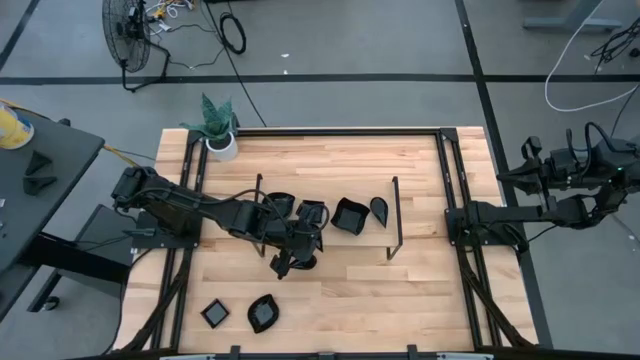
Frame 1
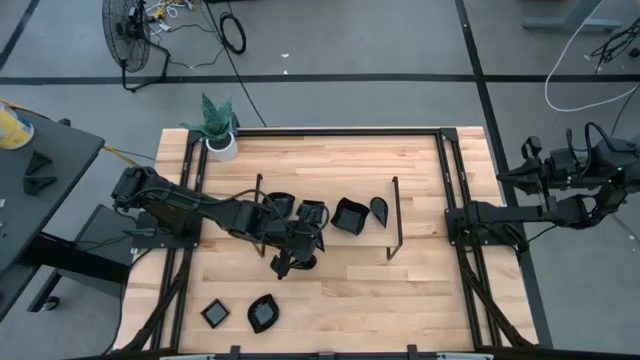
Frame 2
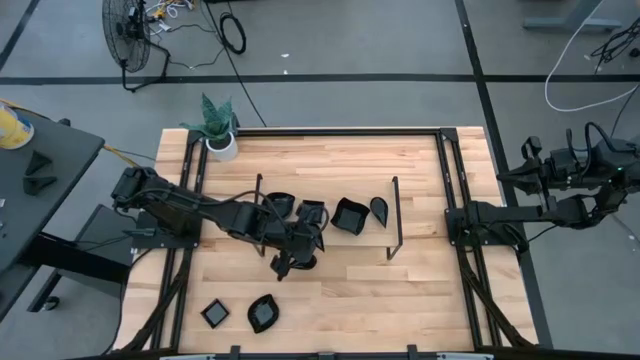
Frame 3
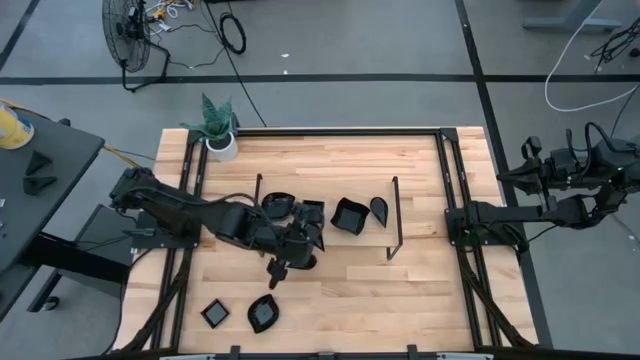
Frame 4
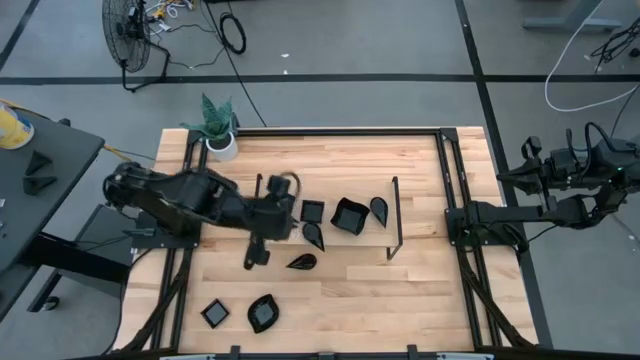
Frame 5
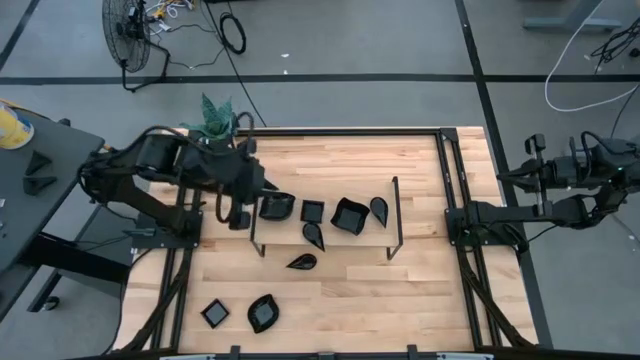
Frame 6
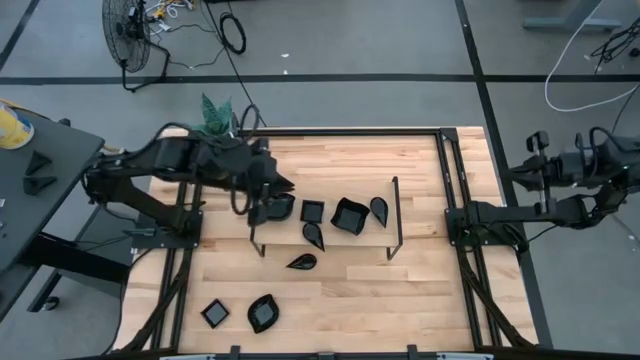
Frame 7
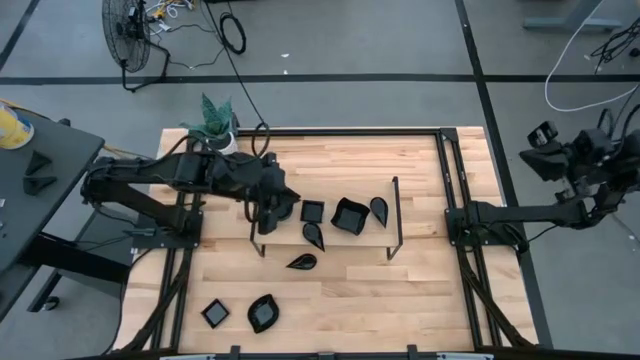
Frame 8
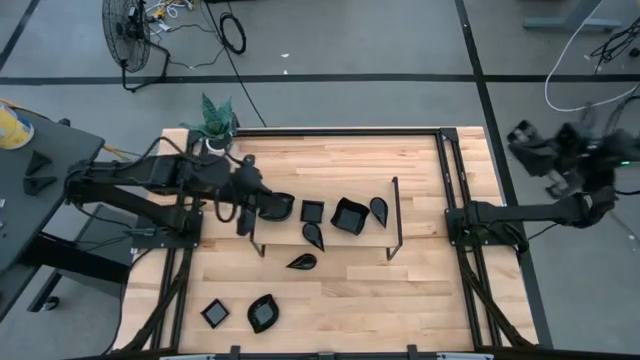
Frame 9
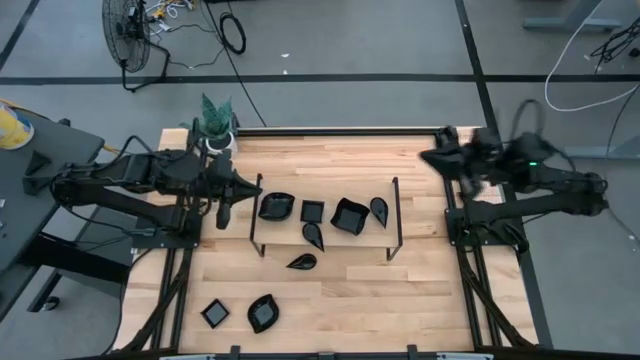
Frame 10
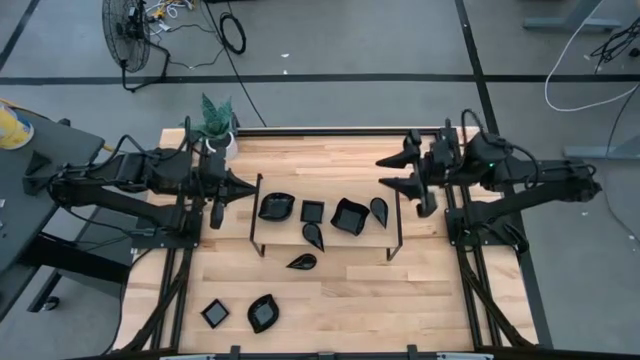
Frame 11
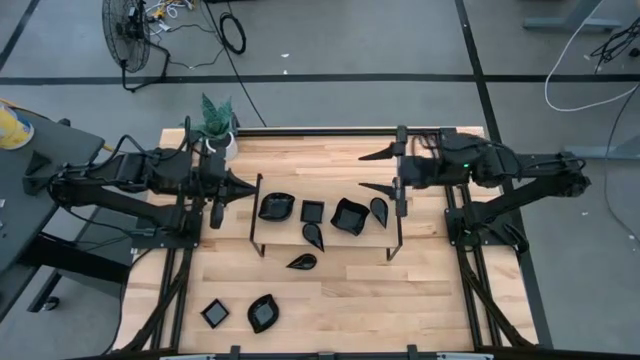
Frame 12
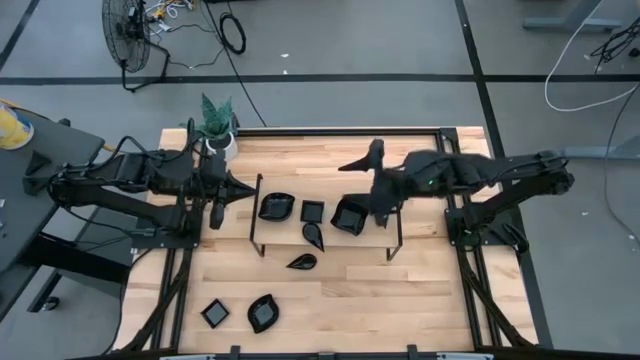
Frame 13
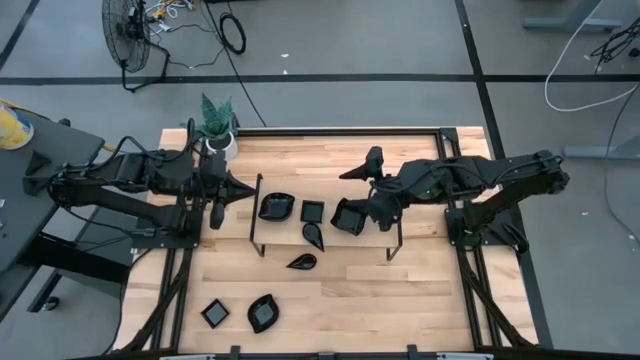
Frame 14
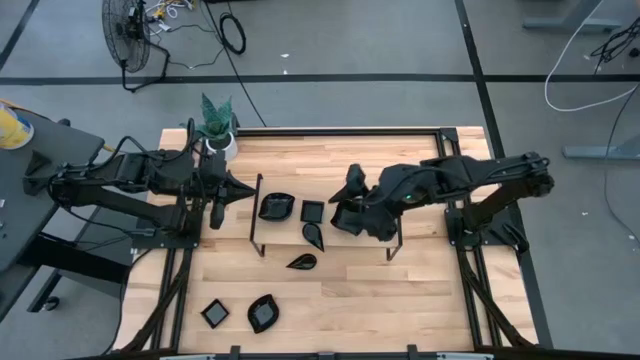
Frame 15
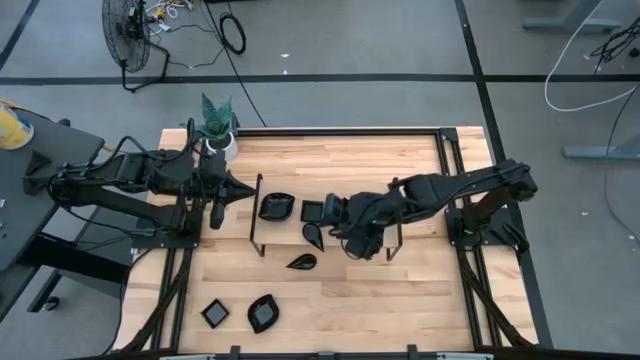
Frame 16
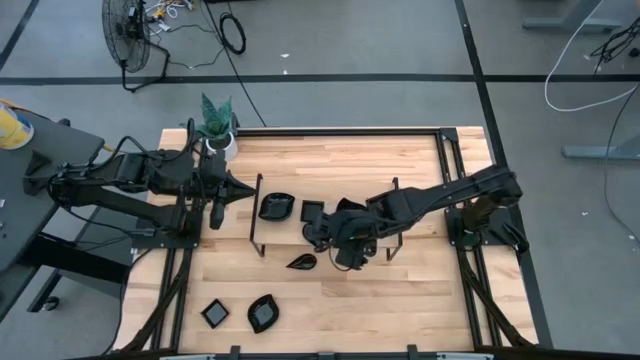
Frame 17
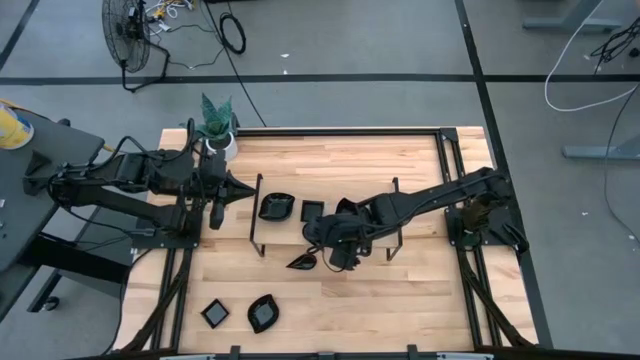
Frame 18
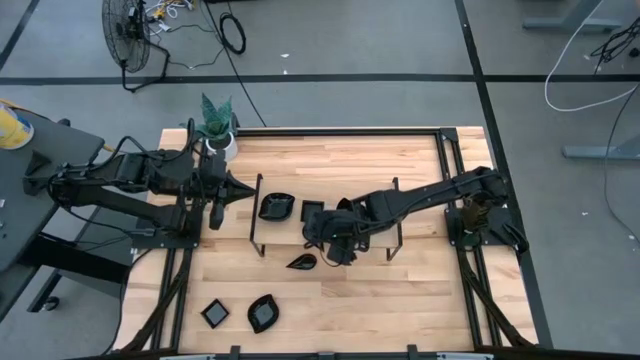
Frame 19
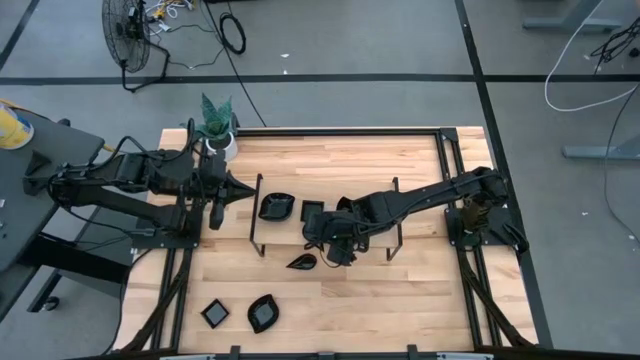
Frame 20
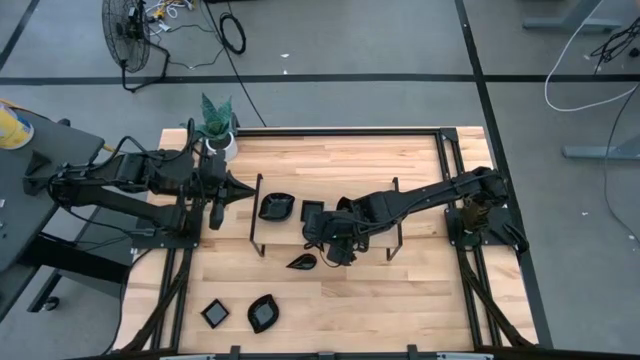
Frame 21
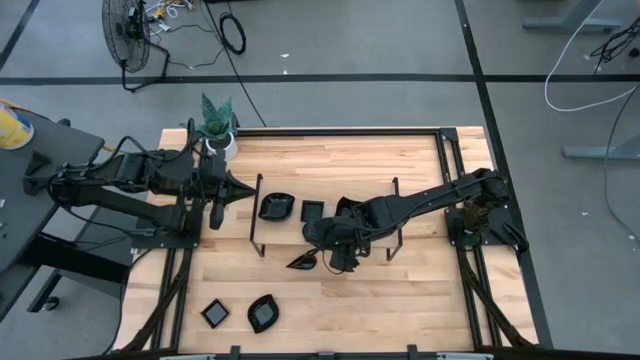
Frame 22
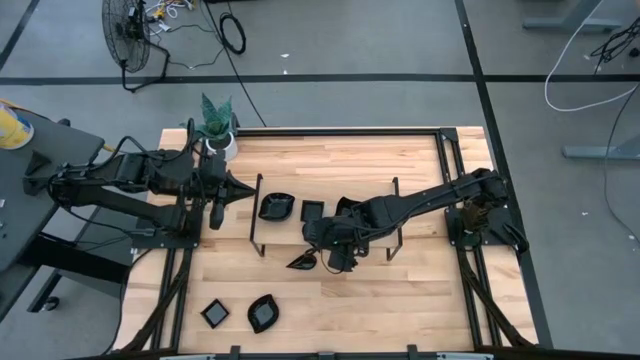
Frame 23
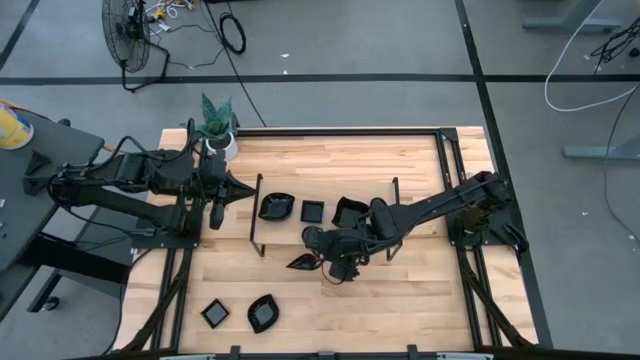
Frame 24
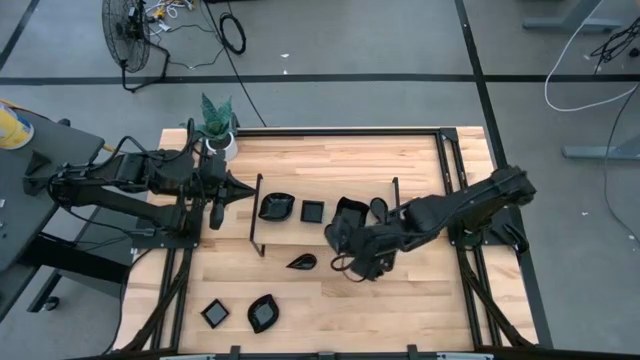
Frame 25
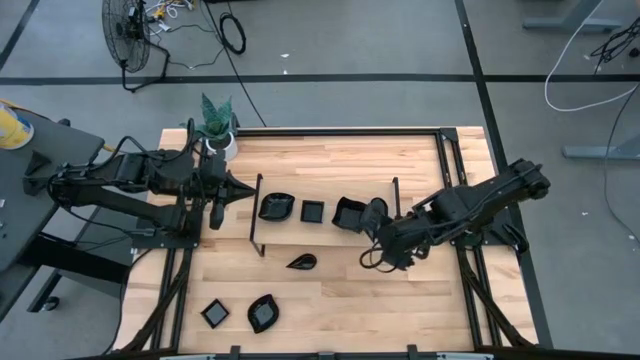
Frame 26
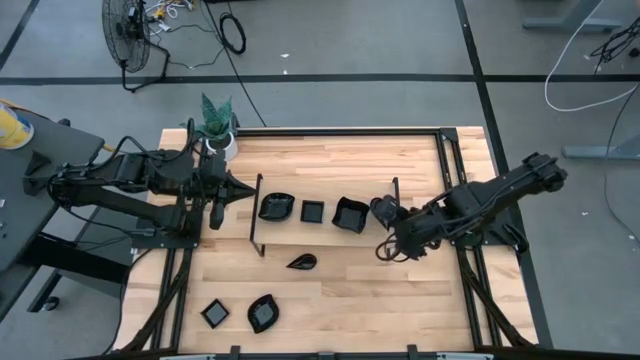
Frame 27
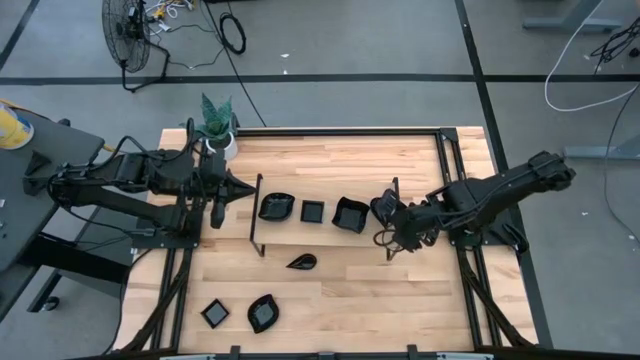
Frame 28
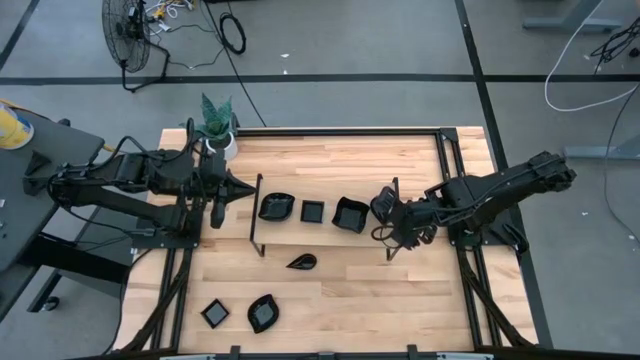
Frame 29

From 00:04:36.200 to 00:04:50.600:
Task: Pick & Place Mini shaped plates
Stack the drop shaped plate on top of the drop shaped plate on the shelf

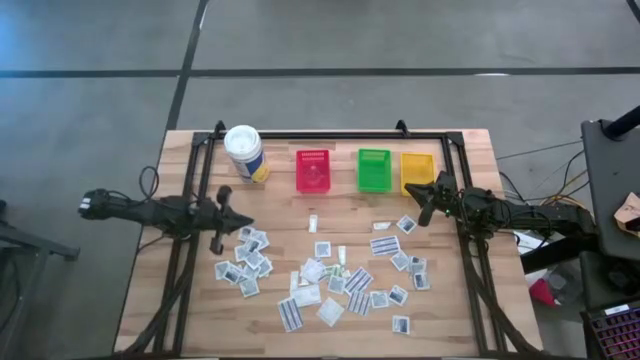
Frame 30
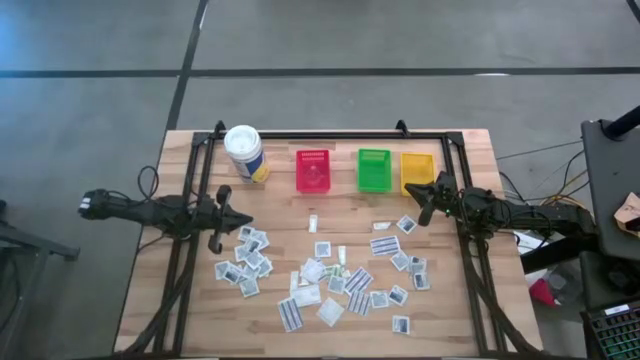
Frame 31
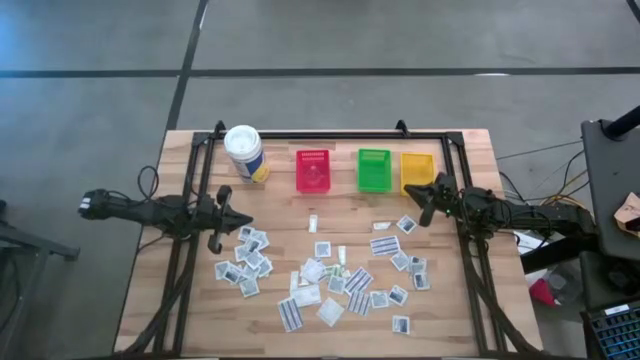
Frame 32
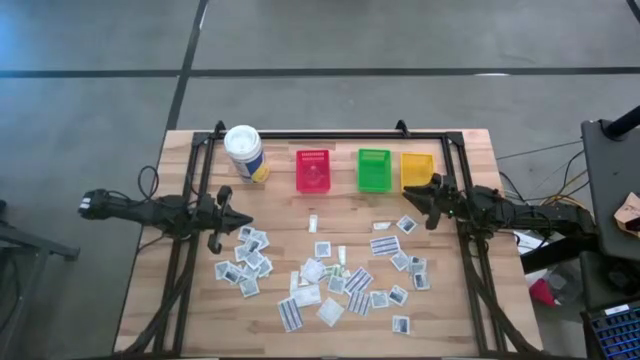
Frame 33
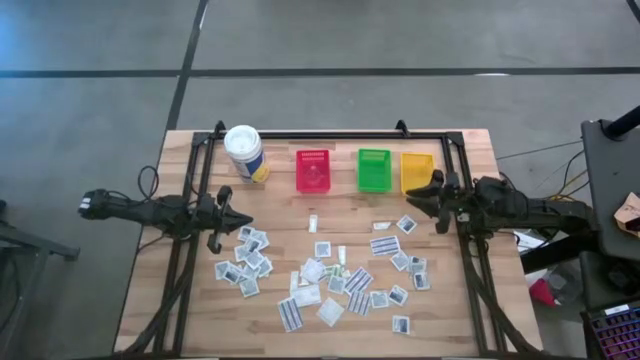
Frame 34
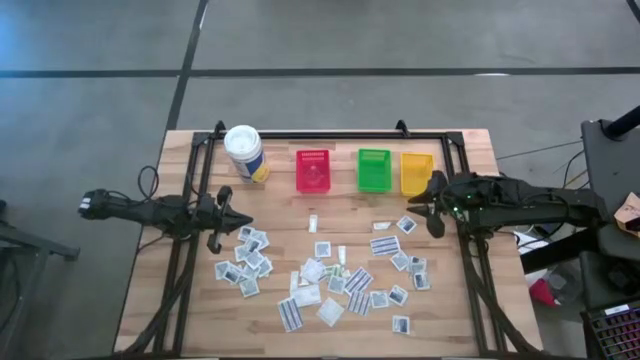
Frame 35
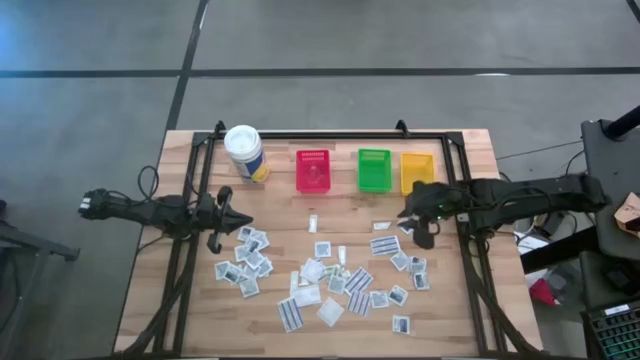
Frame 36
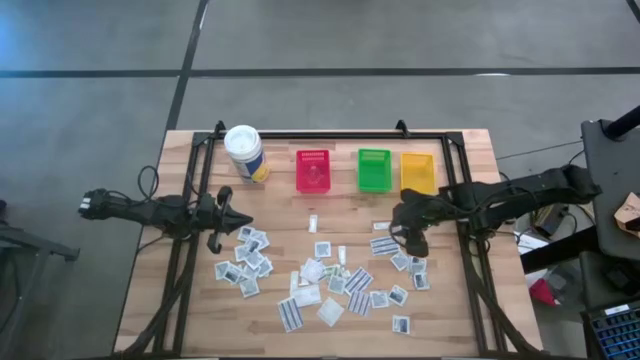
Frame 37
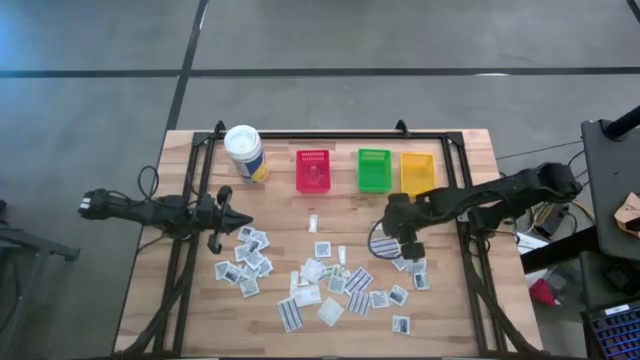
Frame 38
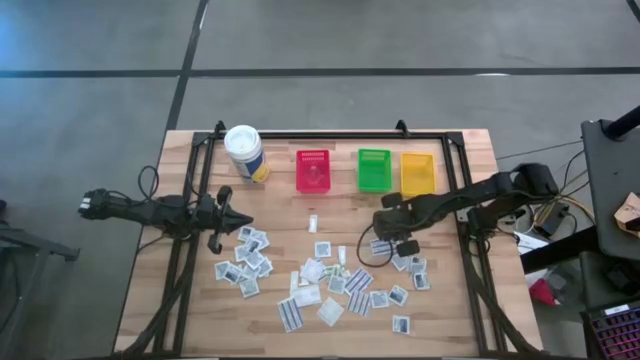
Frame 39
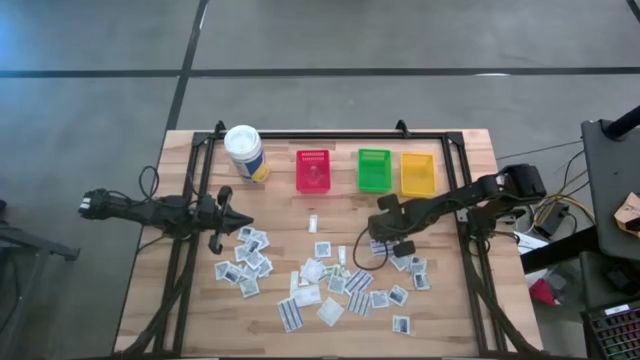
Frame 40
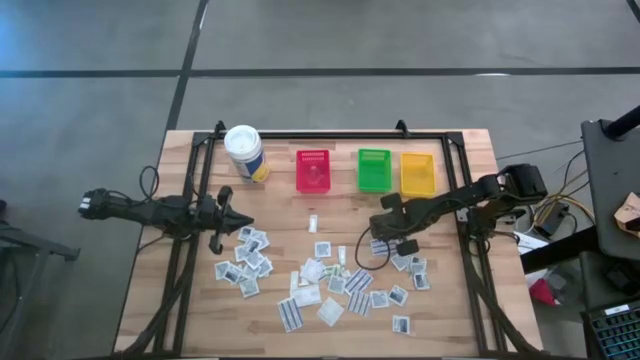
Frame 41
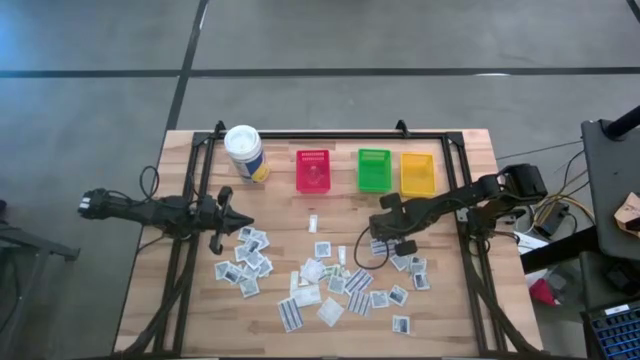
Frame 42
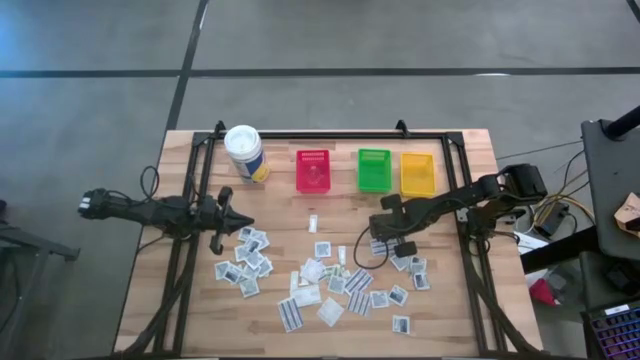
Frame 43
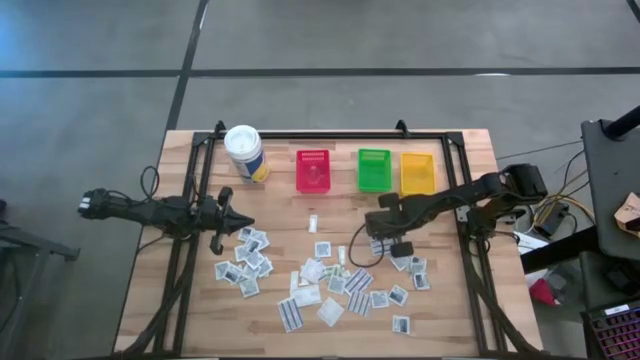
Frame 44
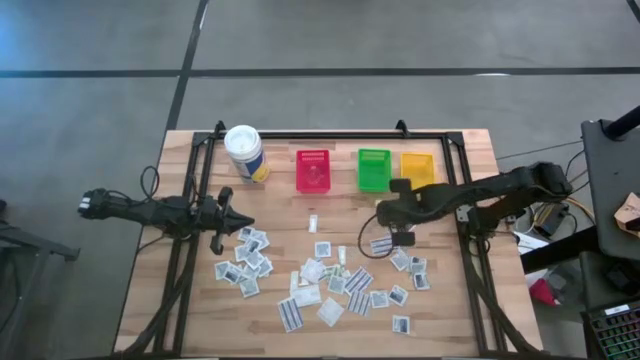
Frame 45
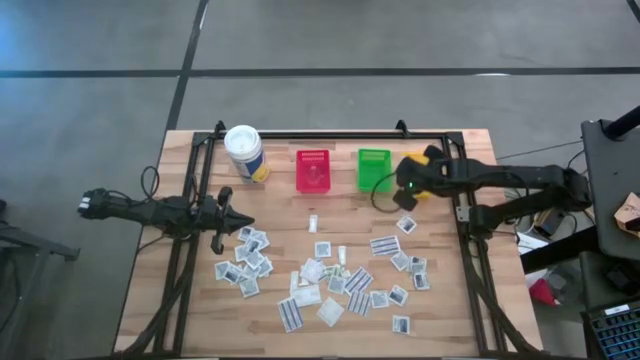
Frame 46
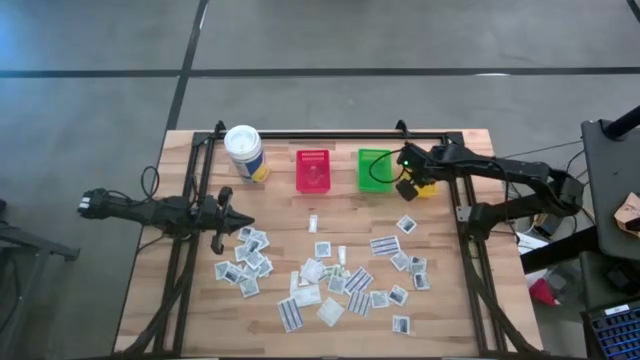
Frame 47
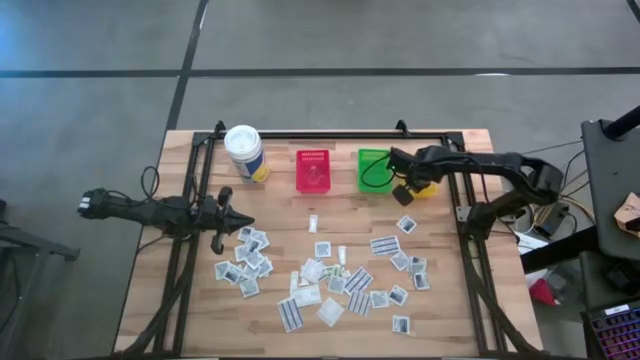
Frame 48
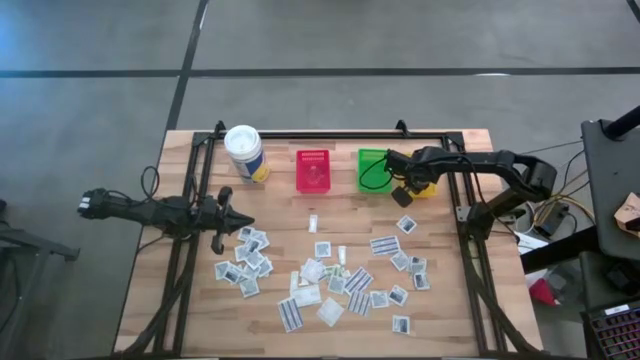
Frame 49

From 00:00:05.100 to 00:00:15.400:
Task: Pick & Place First Aid Supplies
Put the green bandage in the yellow bin
